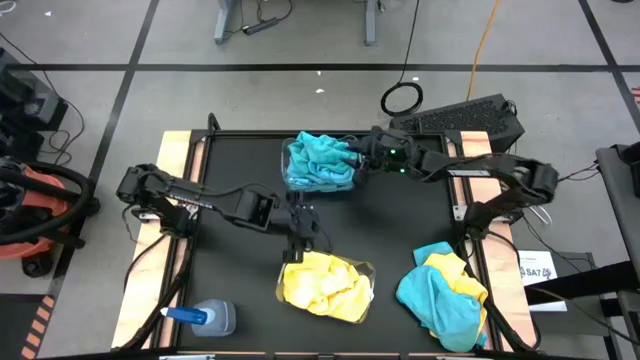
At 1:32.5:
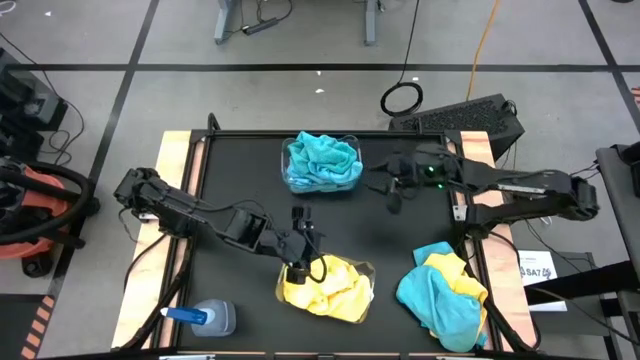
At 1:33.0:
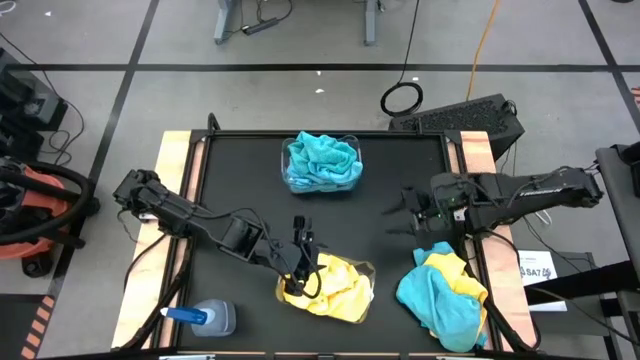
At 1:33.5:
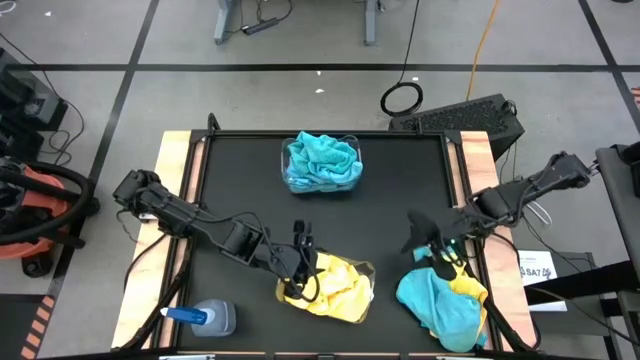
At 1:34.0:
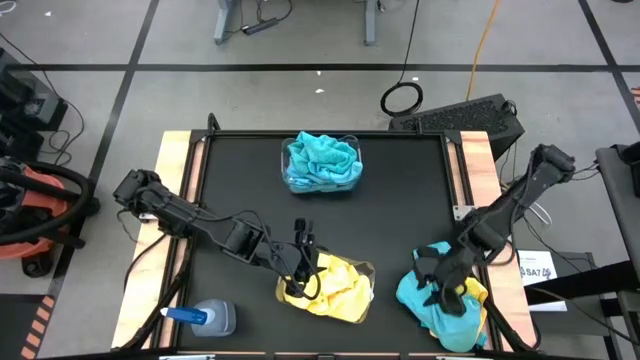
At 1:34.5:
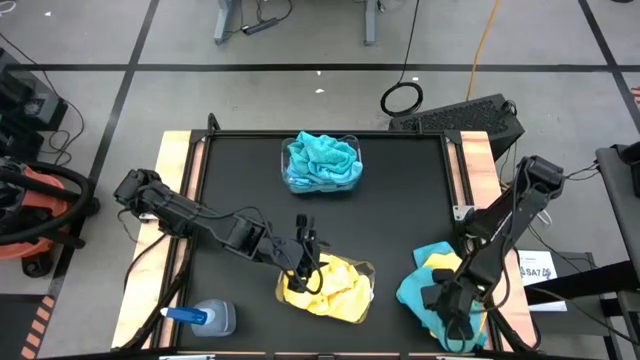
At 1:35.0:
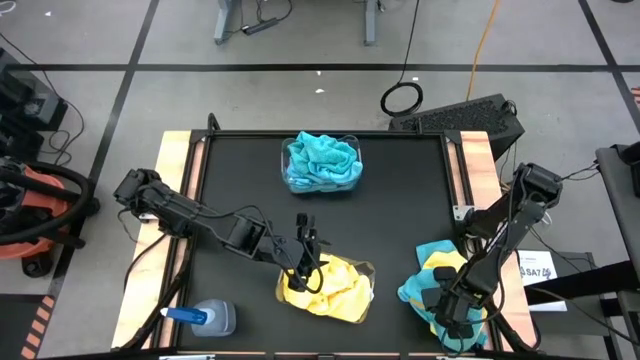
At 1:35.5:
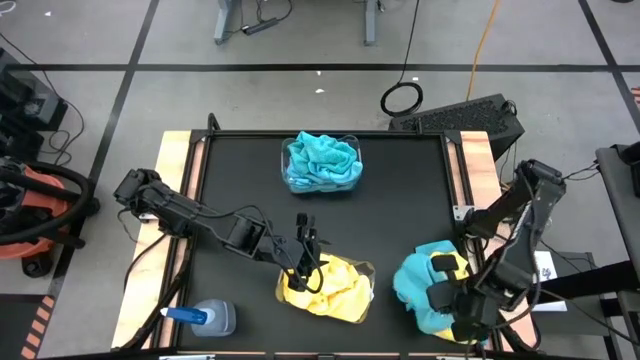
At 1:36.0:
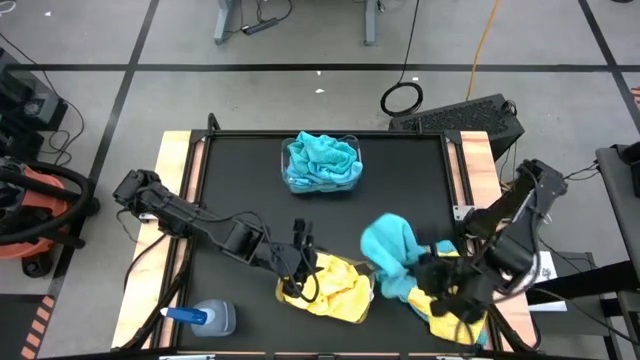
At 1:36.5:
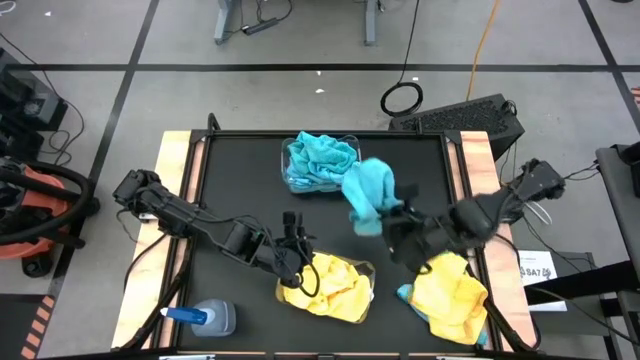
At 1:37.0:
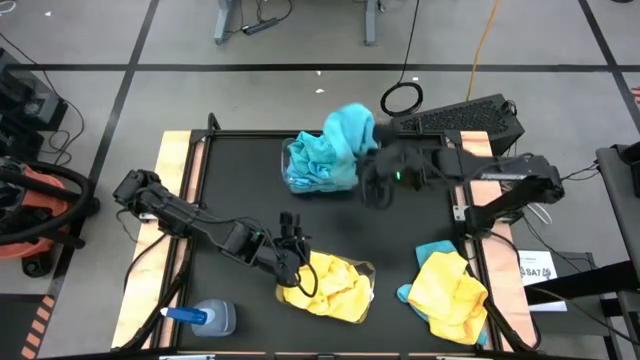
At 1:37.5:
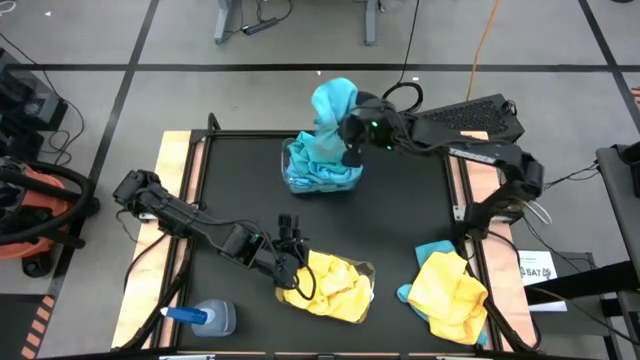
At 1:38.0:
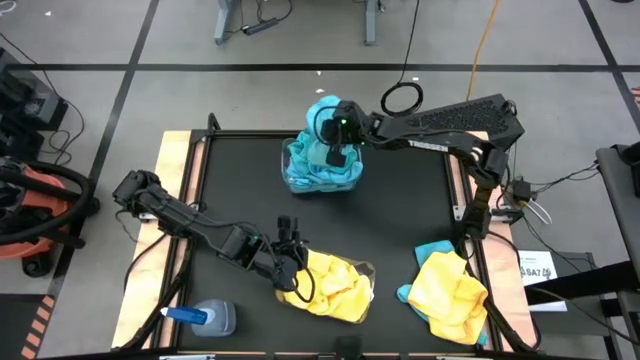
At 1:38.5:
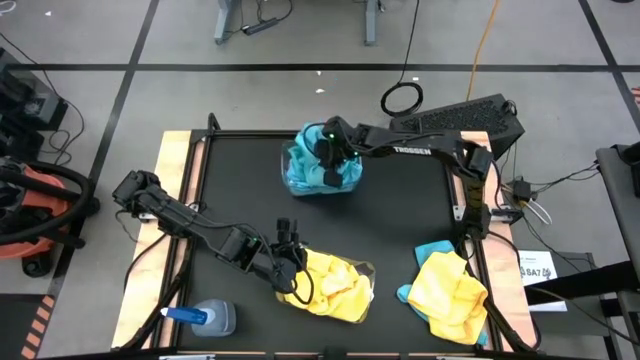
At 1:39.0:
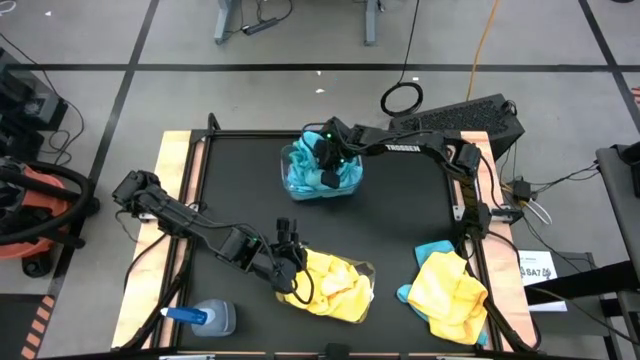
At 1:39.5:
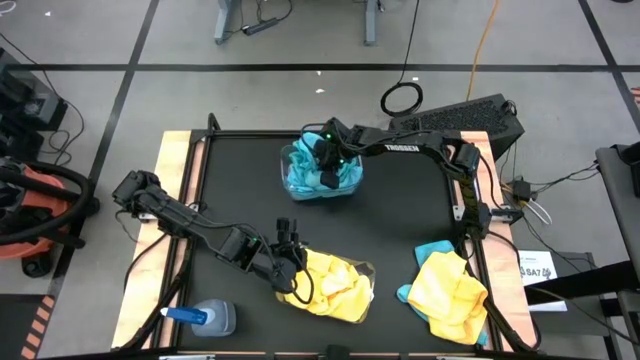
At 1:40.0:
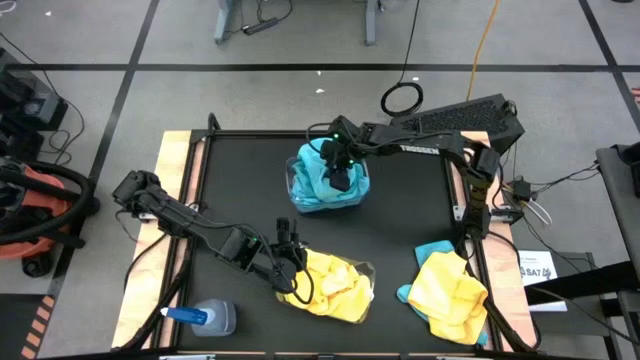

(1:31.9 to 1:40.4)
Task: Sort microfiber towel by color & place in baskets
Put the blue microfiber towel into the top transparent bin

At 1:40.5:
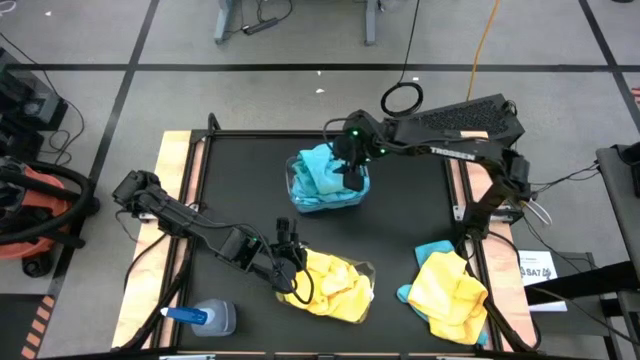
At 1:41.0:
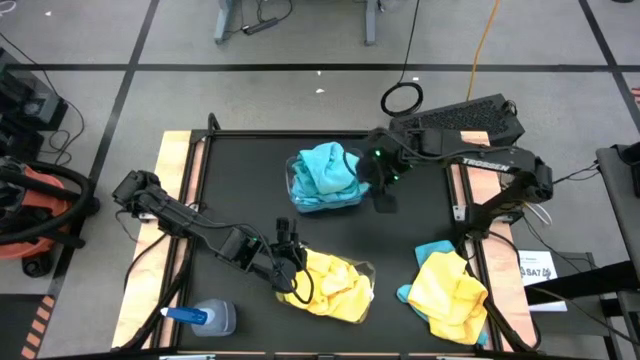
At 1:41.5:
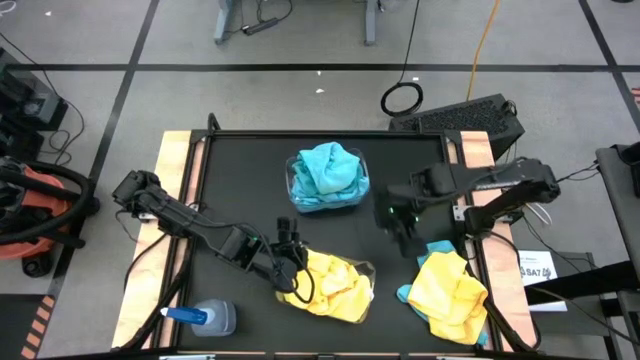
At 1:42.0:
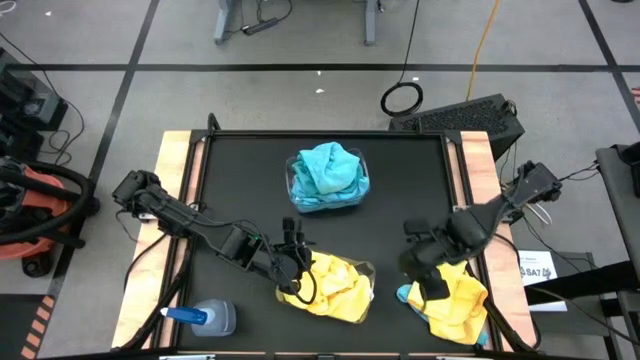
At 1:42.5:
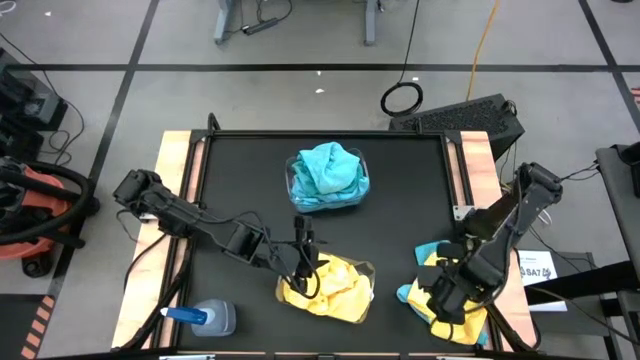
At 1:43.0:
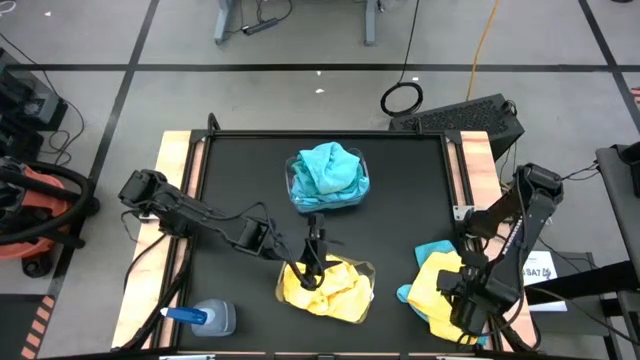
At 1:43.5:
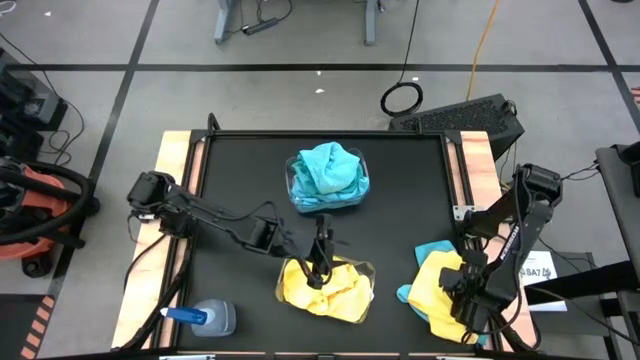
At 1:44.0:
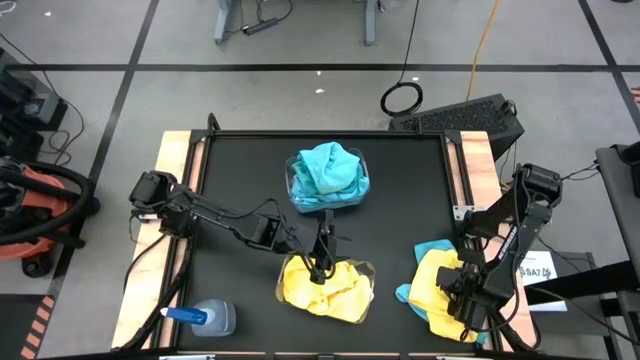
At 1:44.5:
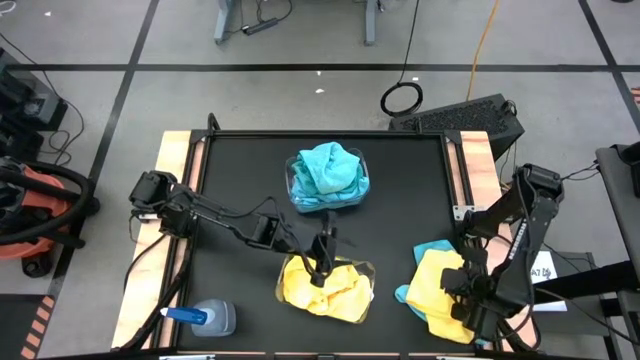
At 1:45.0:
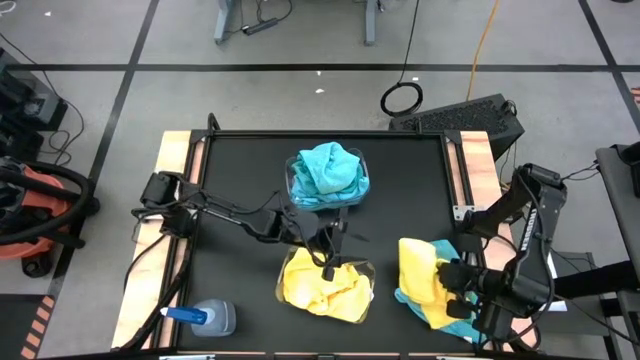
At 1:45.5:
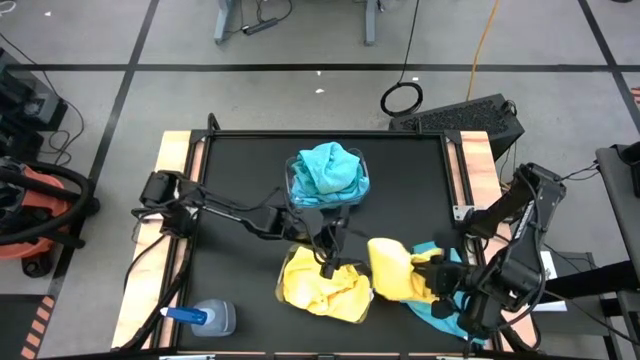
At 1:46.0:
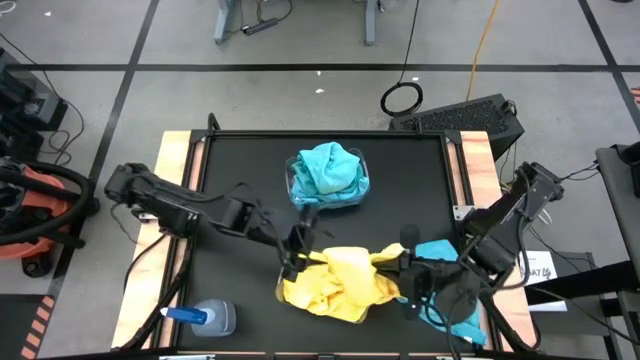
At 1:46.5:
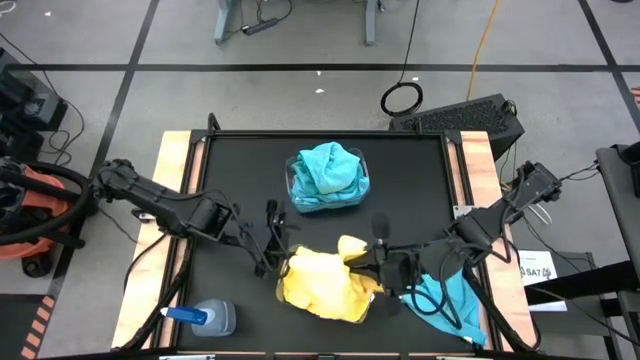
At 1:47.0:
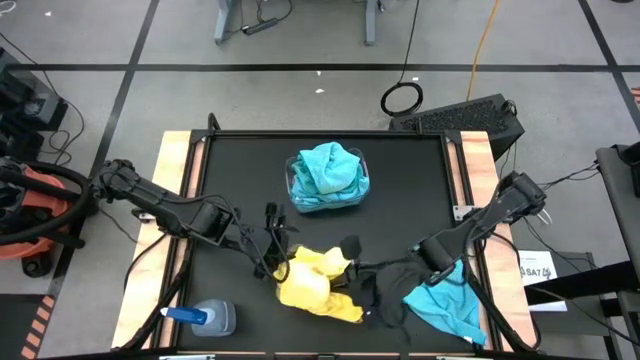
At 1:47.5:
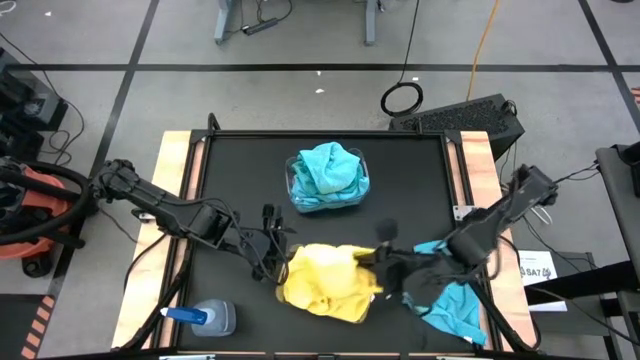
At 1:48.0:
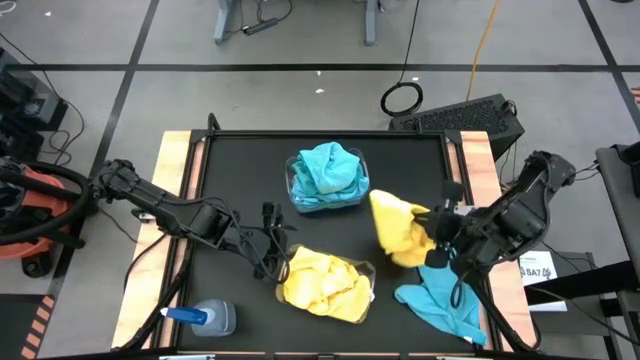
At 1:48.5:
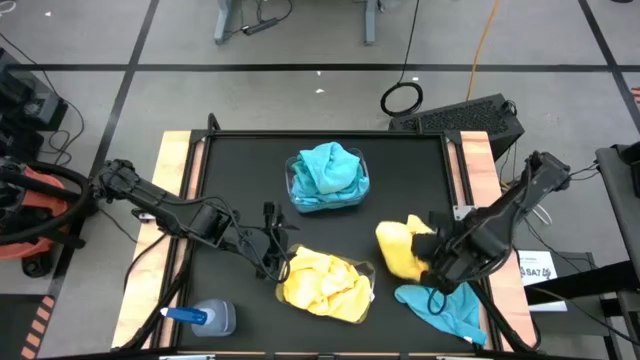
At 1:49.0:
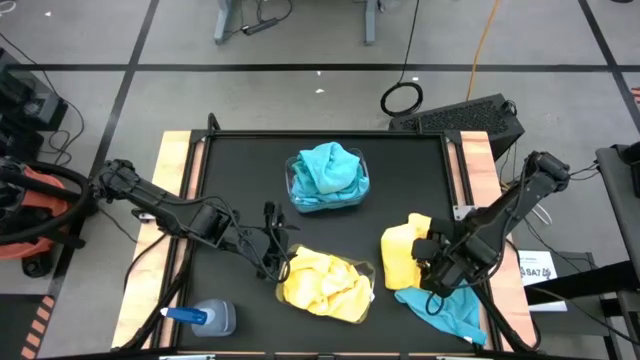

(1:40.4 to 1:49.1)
Put the yellow microfiber towel into the bottom transparent bin

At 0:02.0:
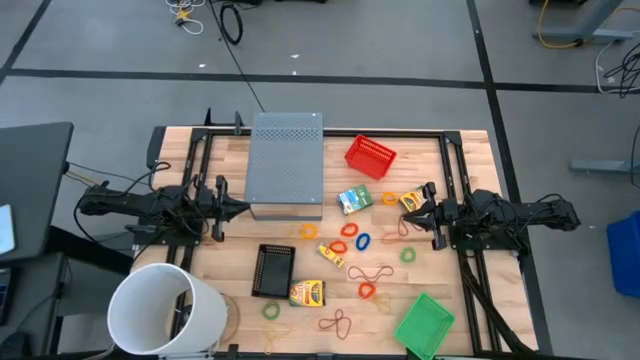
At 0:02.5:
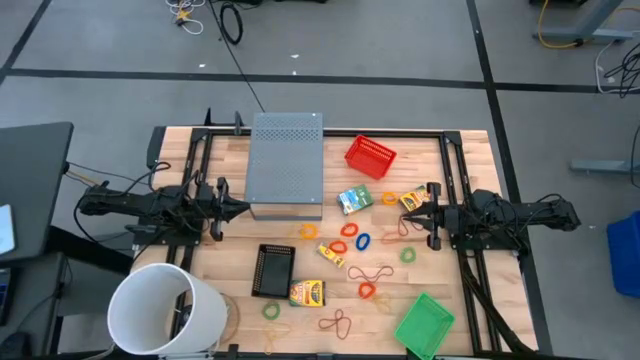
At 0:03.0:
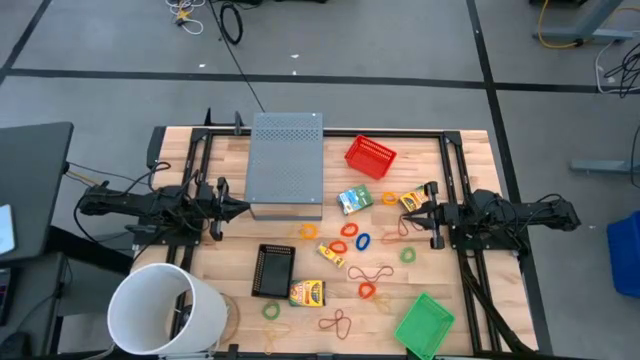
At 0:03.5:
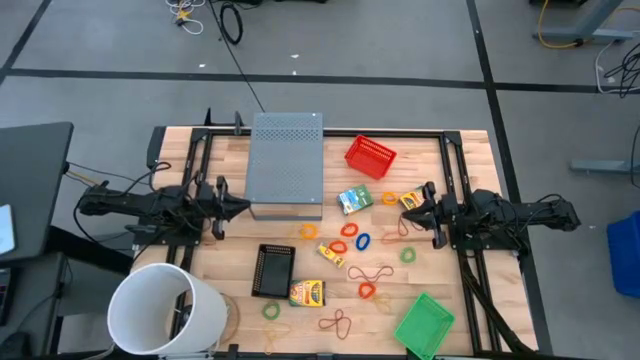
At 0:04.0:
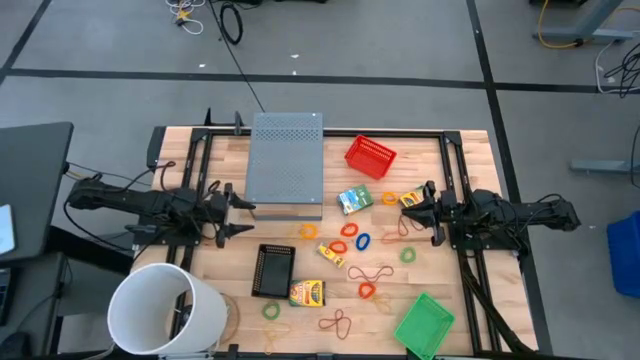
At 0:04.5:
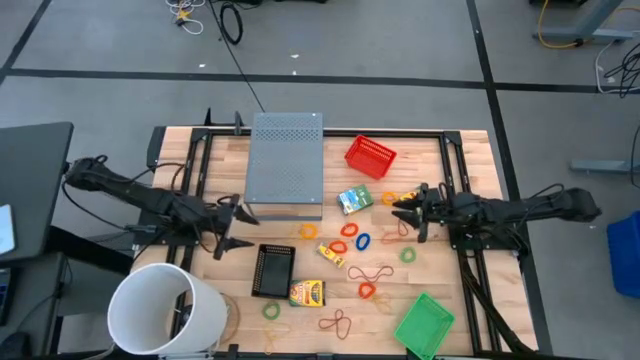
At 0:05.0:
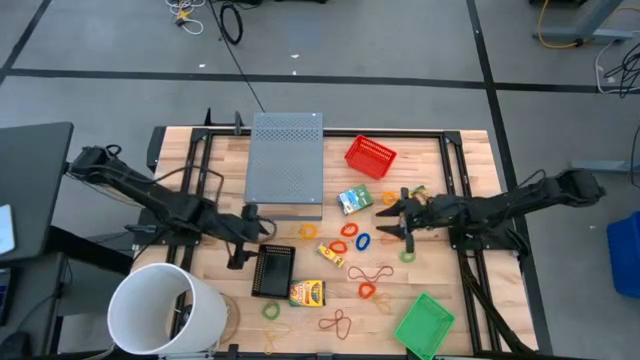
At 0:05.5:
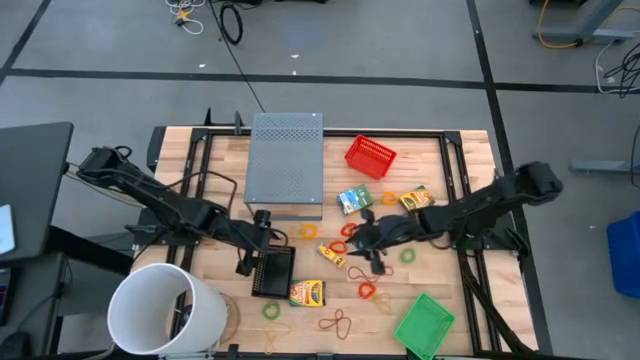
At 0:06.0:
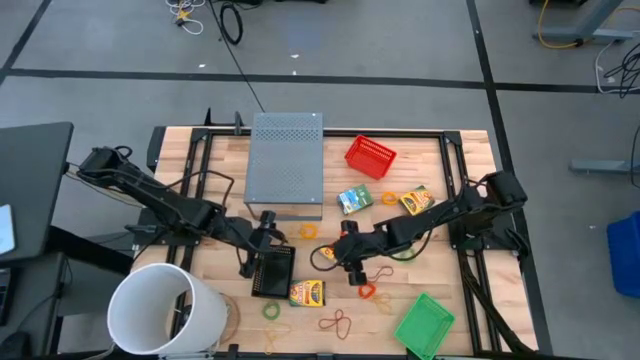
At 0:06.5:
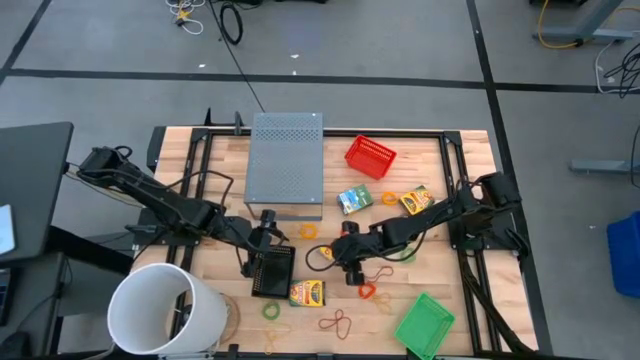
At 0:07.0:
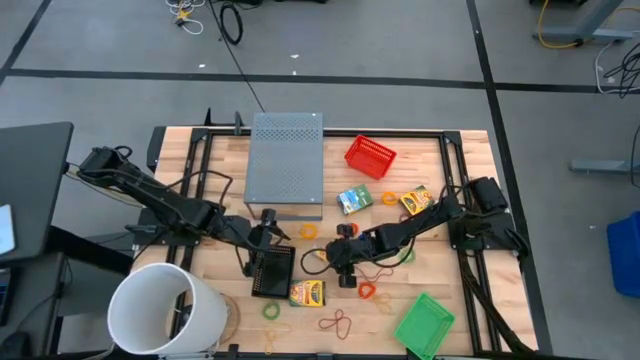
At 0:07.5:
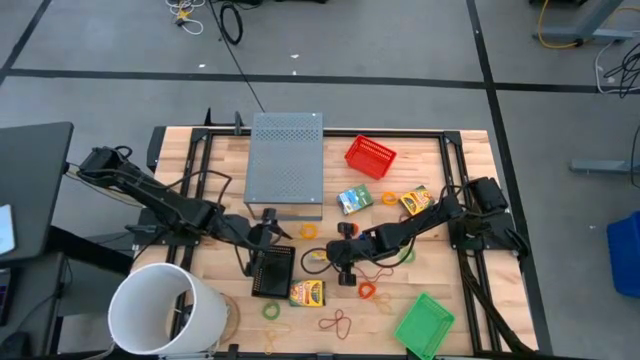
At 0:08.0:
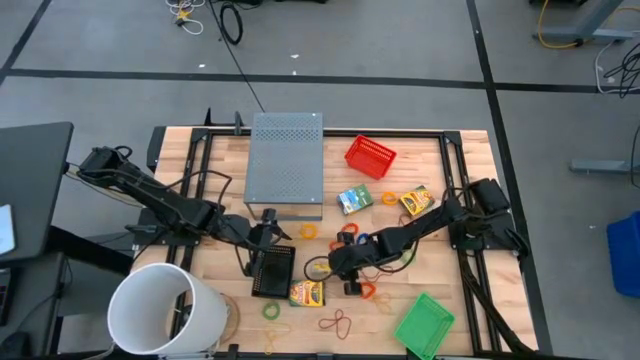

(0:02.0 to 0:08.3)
Task: Pick & Place Office Desk Supplies
Adjust the middle crayon box on the table
